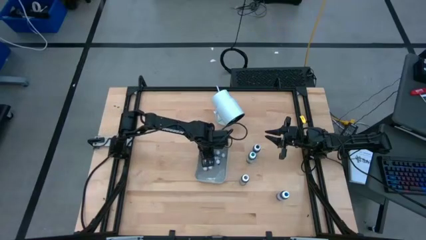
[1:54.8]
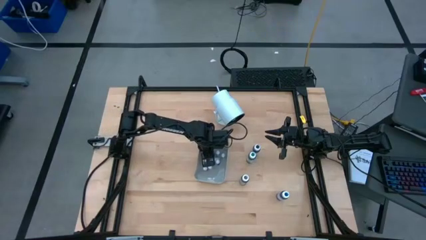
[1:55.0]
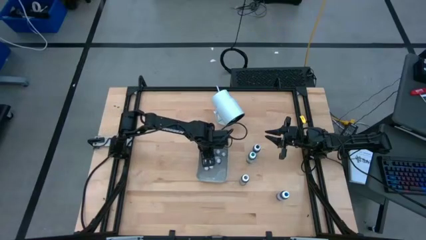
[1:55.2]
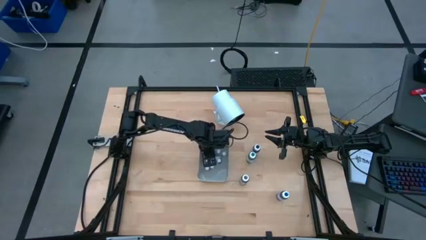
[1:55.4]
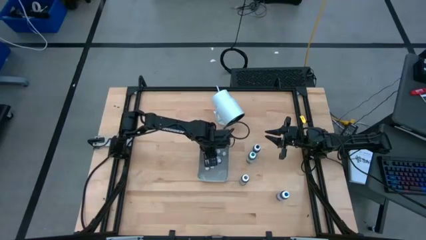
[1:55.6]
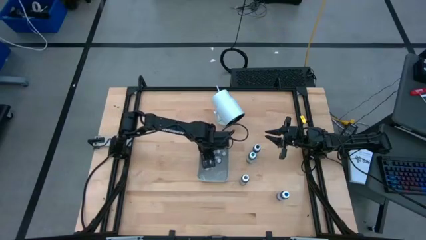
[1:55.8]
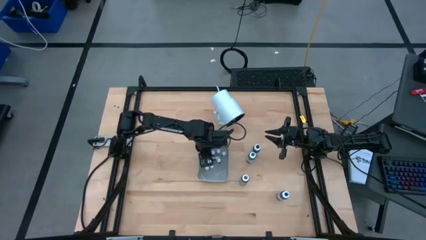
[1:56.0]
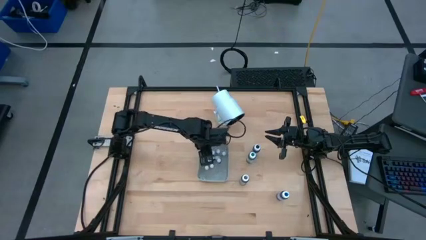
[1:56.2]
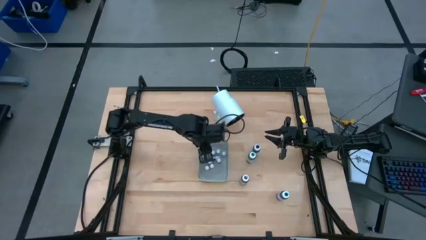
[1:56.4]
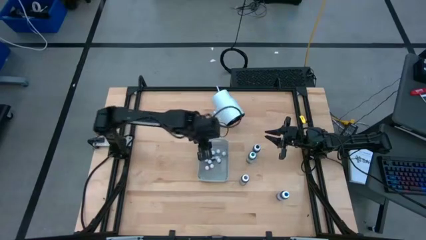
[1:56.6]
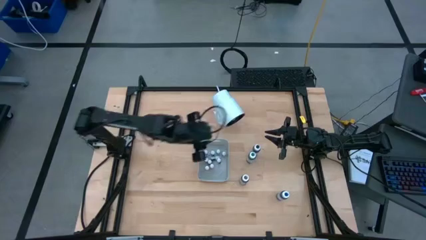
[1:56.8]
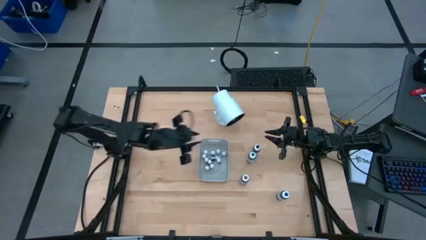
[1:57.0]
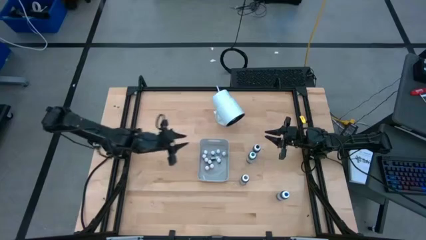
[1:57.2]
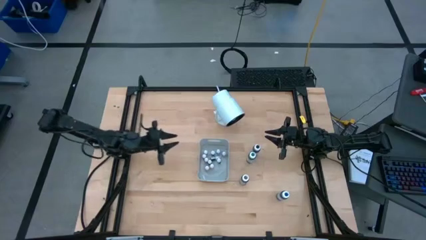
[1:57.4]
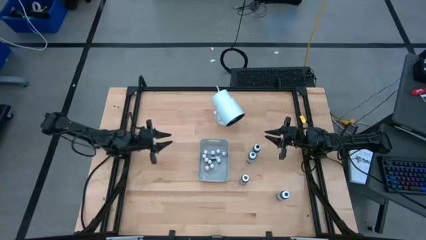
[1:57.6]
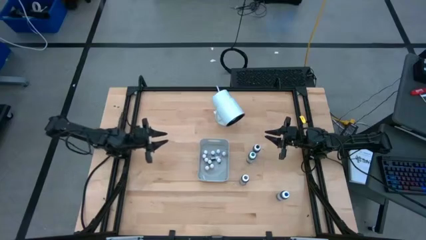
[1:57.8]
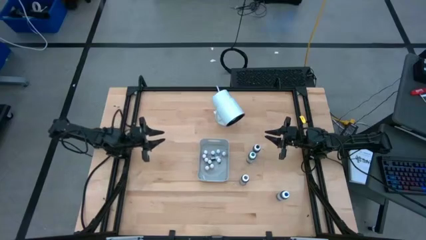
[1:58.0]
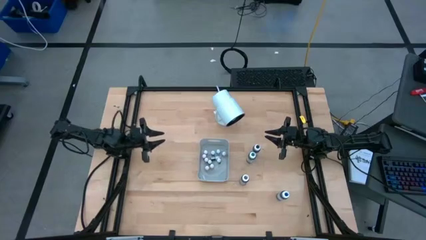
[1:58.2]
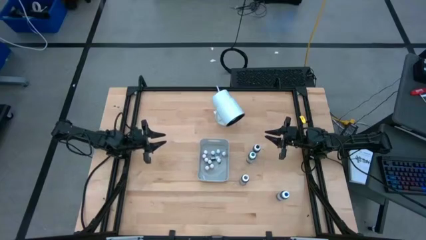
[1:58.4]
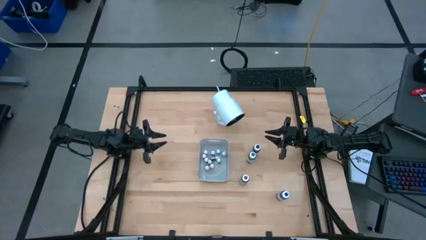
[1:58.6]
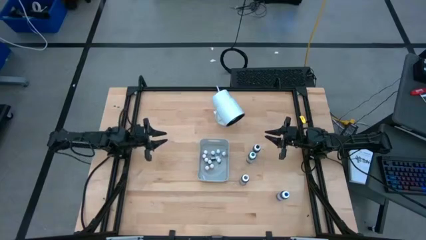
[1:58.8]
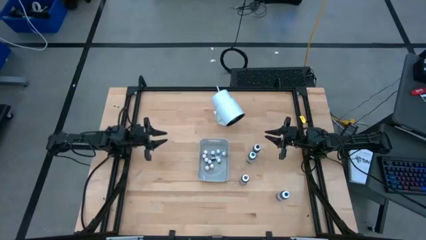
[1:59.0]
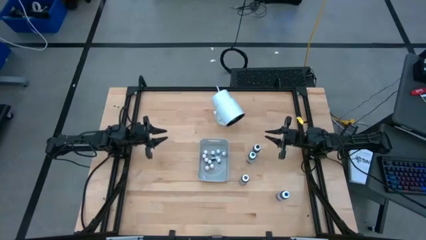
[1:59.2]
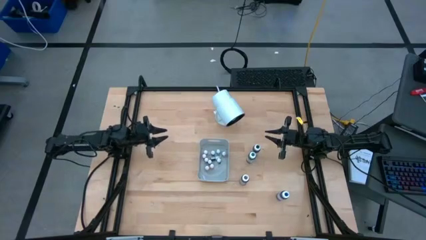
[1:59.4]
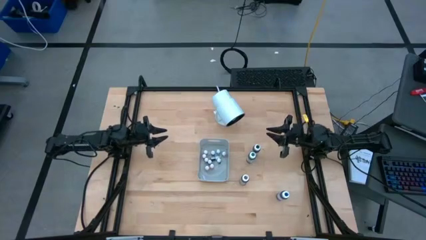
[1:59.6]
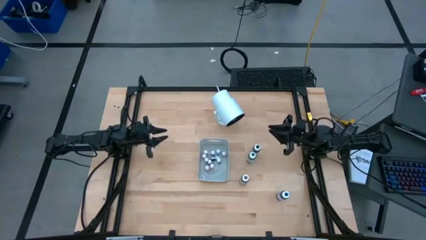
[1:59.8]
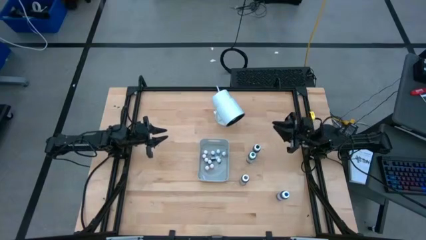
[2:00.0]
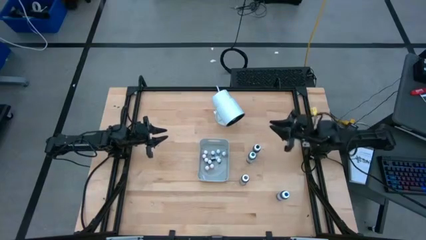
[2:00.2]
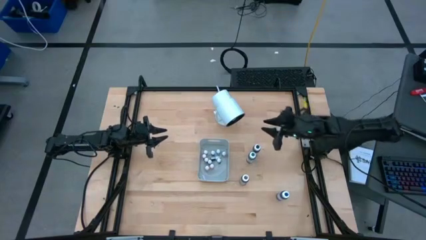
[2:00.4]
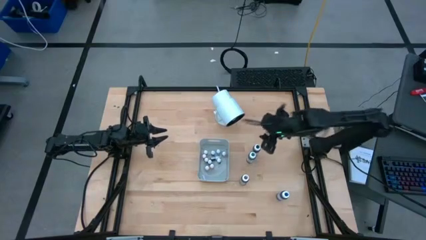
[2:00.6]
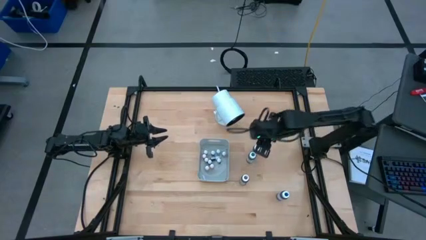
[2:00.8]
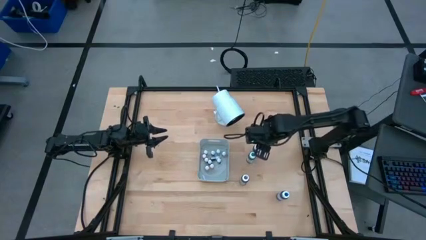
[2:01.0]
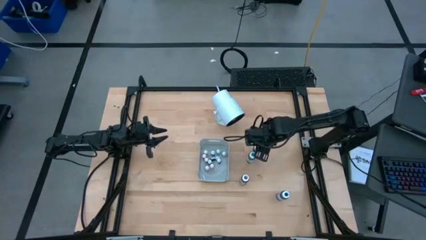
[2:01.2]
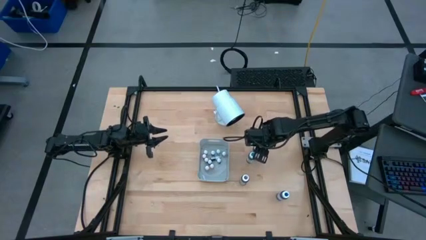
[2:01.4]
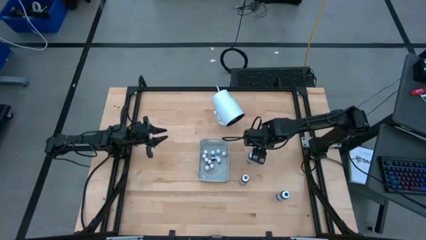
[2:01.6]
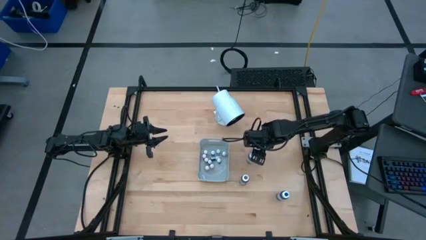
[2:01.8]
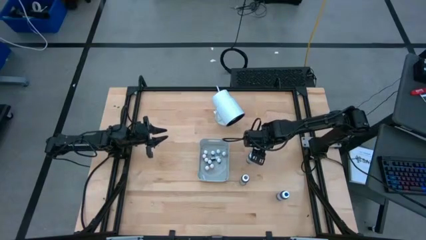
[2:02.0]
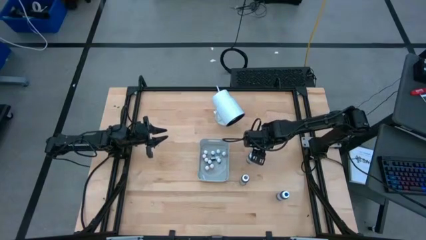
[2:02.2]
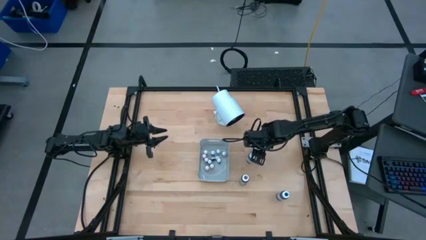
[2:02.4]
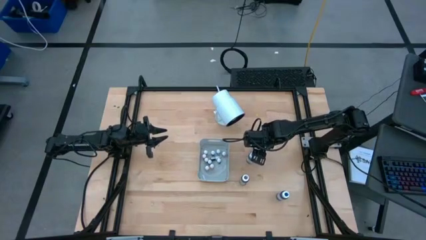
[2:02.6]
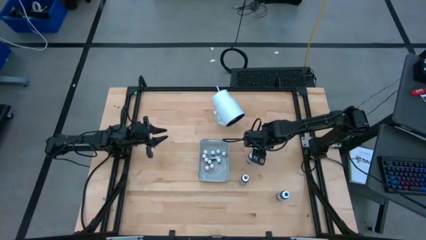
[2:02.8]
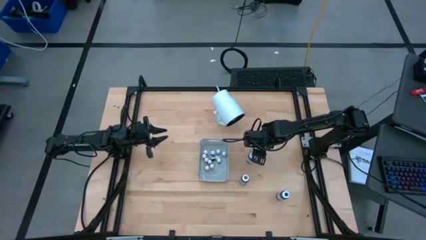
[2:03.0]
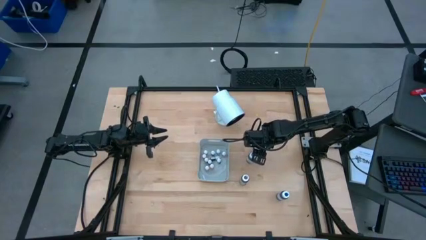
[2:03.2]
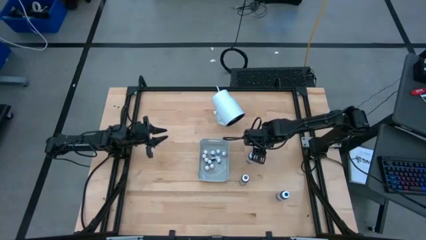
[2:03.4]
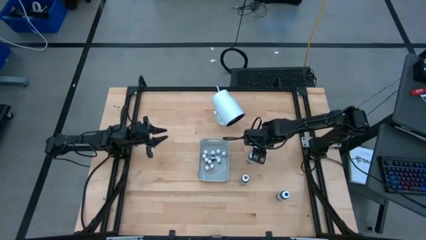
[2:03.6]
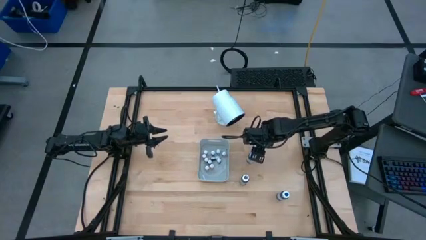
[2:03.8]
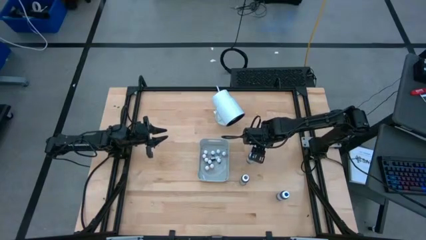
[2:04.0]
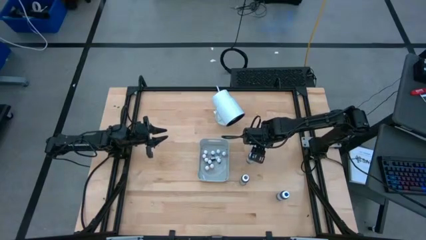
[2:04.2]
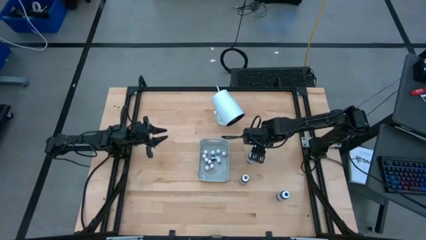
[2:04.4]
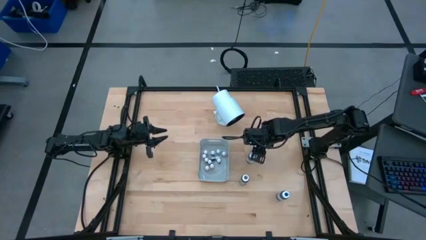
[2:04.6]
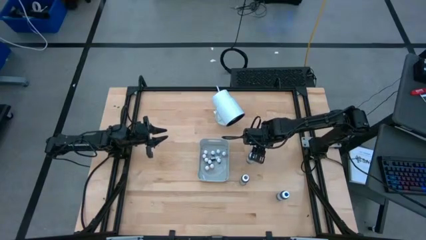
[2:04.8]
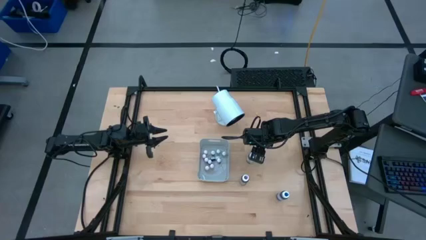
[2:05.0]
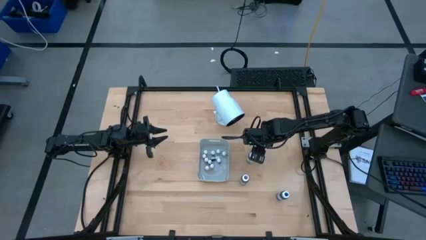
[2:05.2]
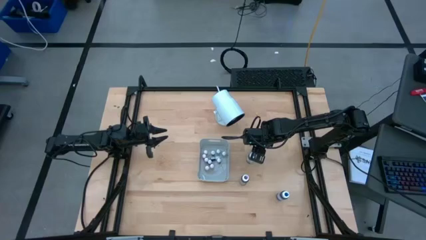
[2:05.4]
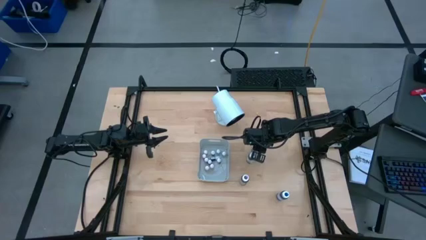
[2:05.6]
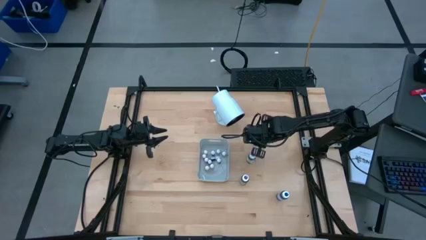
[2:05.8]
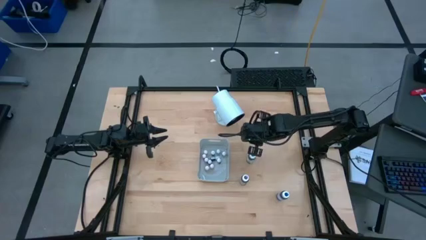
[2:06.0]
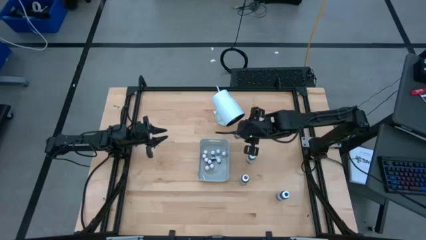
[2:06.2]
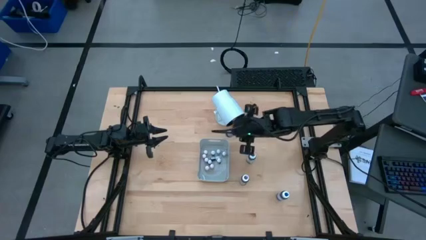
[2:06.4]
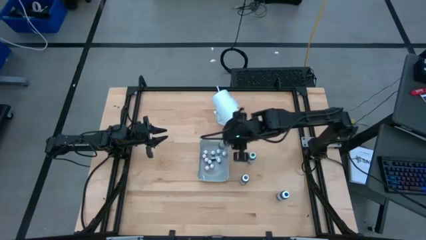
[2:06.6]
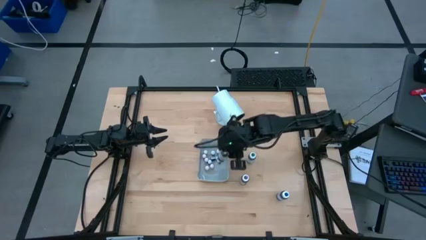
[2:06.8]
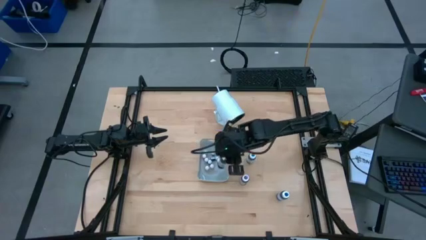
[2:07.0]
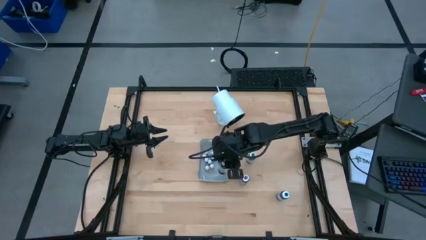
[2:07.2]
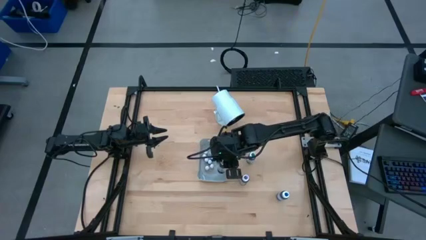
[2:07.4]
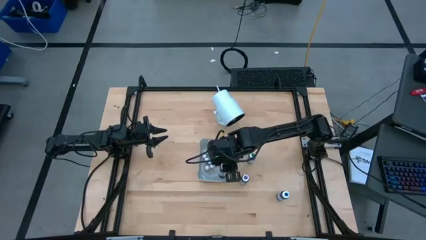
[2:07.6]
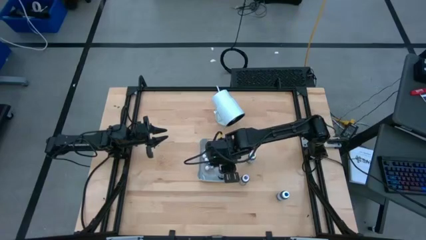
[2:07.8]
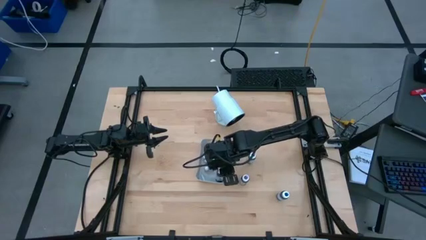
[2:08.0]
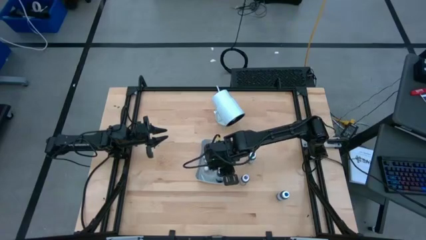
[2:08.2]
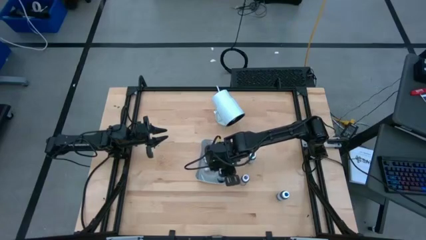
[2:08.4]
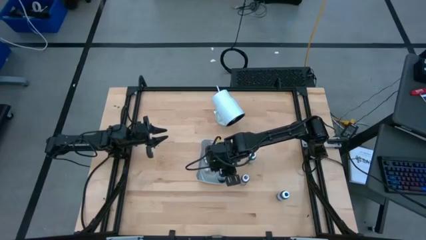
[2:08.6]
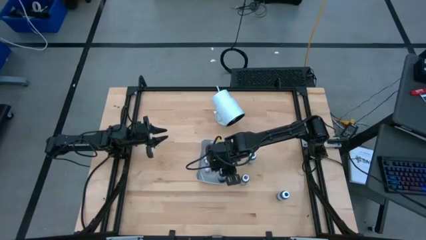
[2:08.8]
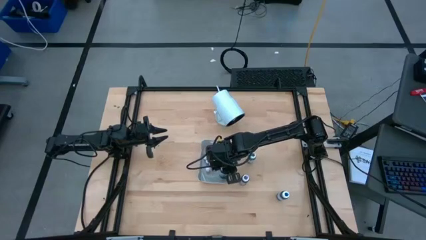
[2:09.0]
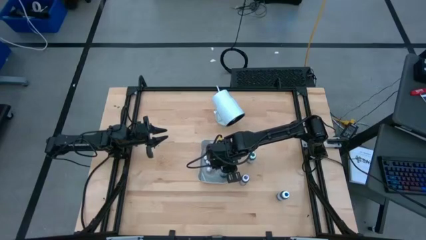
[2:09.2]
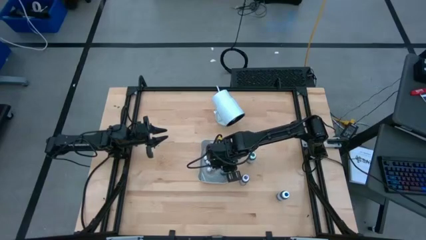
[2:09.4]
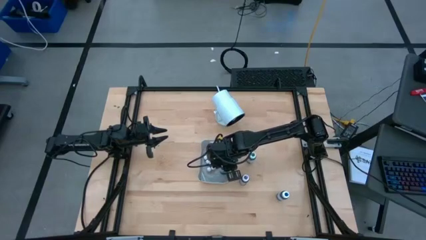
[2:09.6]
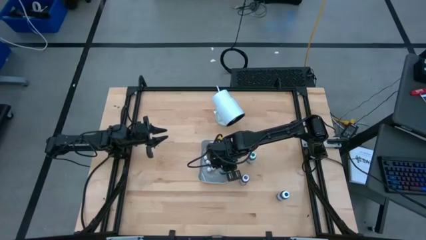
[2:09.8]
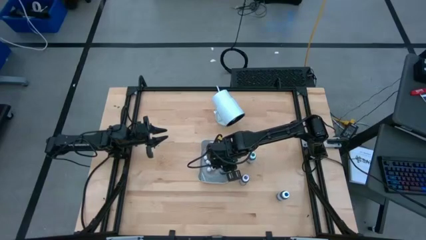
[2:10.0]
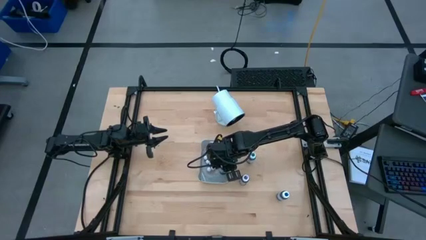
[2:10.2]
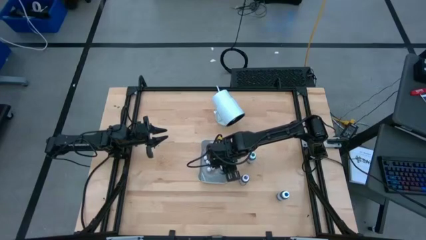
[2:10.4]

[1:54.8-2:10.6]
Task: Pick & Place food coloring
Put the big black food coloring bottle into the gray bin
